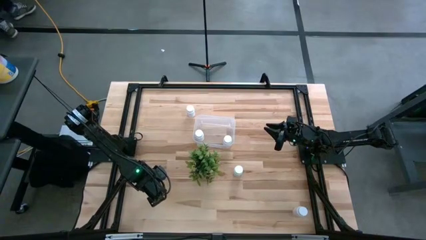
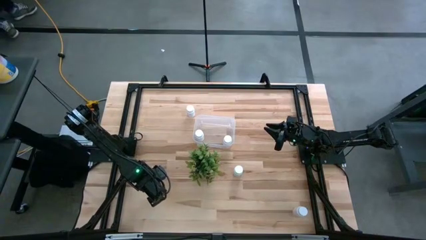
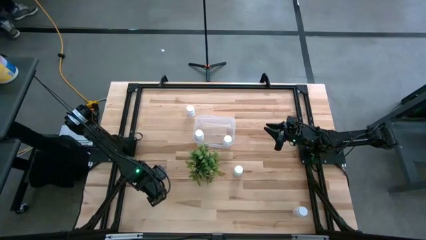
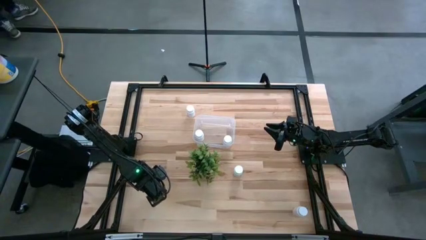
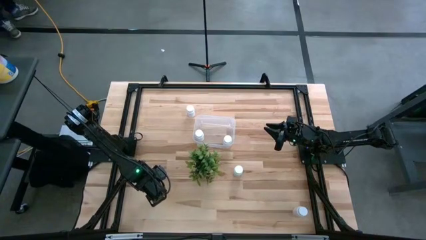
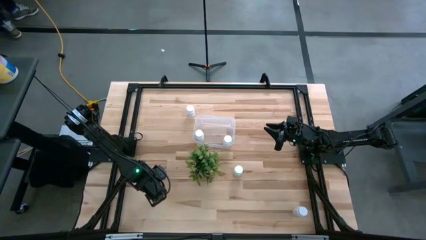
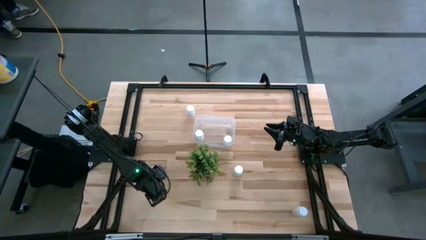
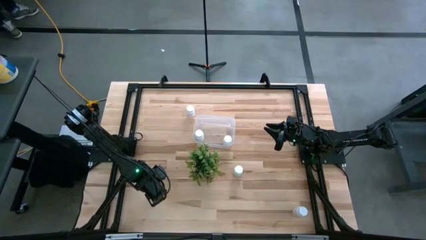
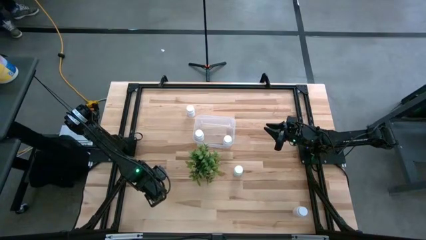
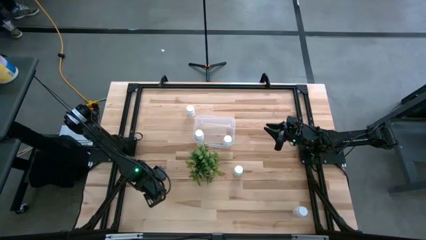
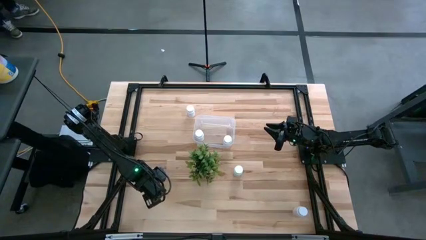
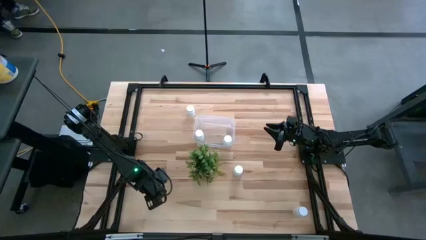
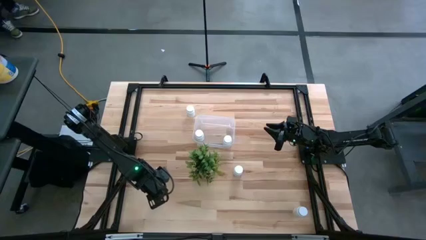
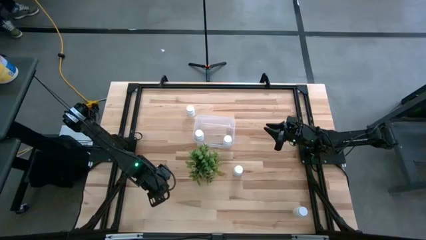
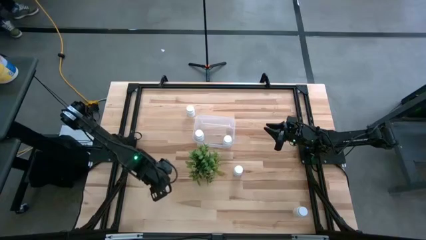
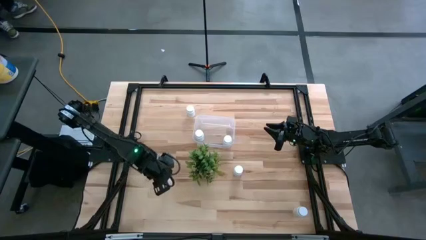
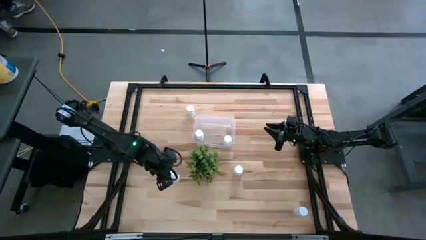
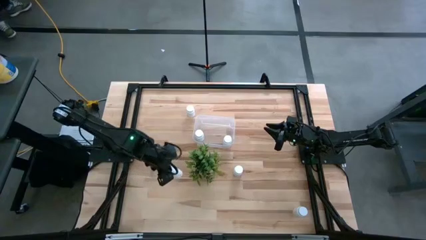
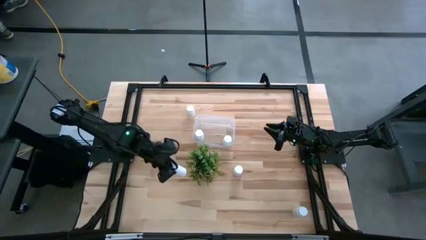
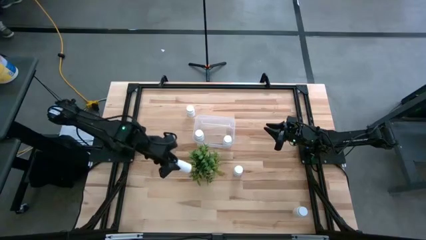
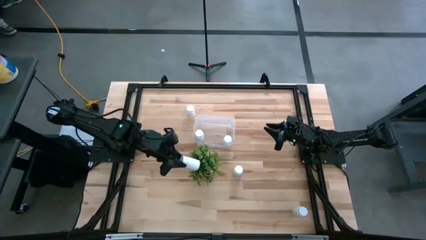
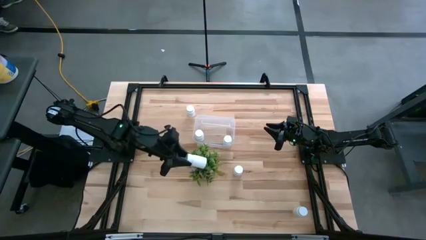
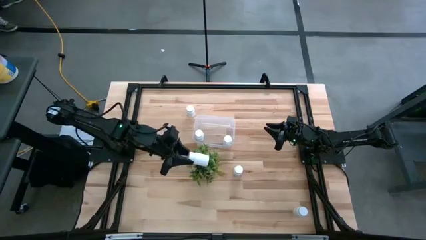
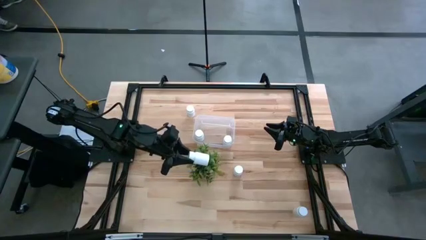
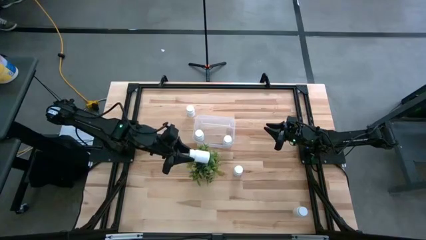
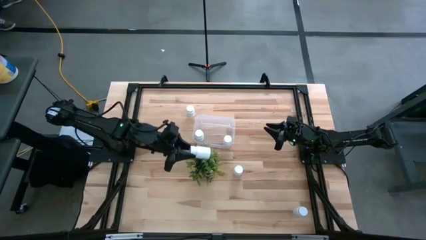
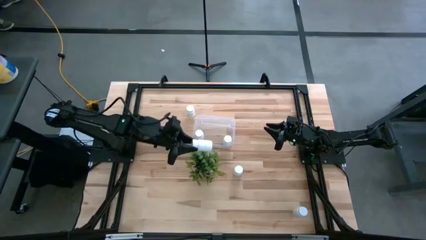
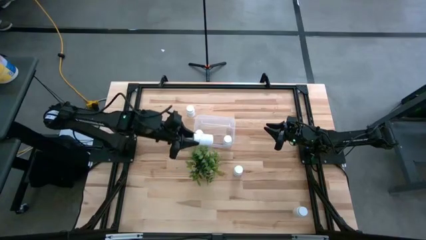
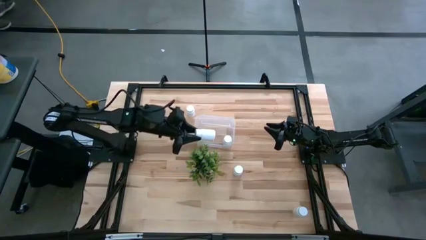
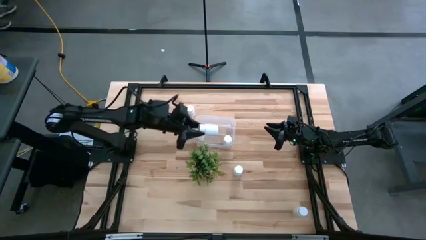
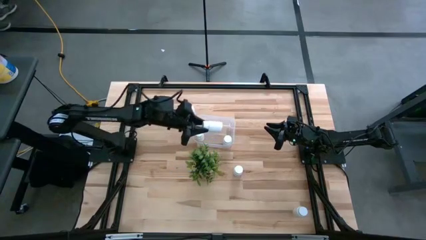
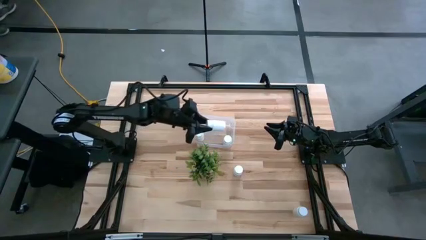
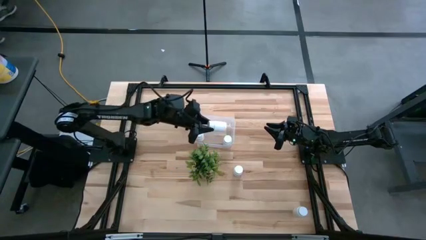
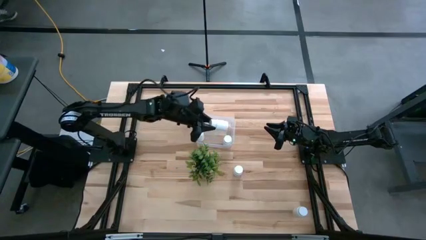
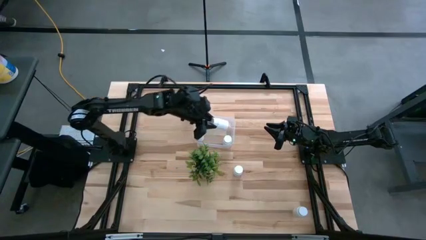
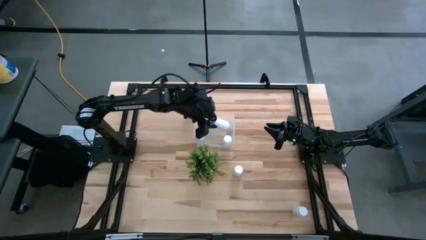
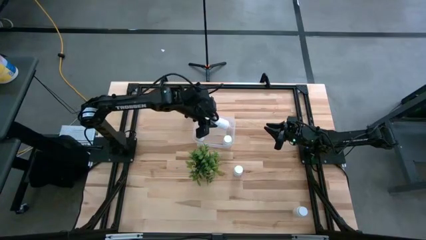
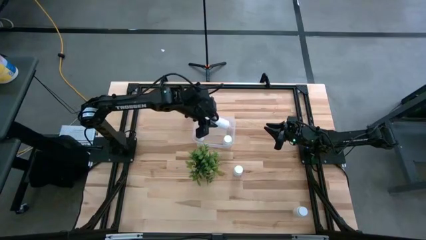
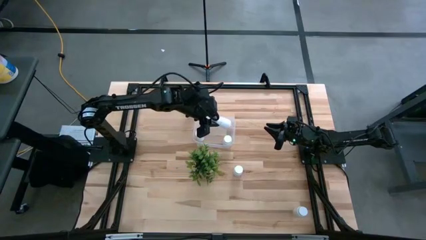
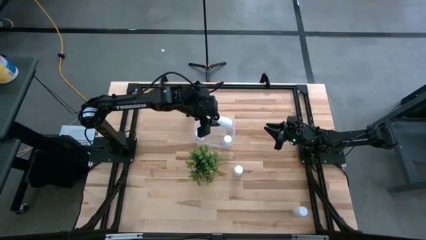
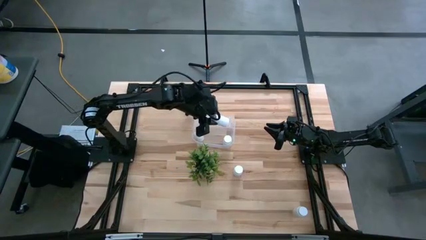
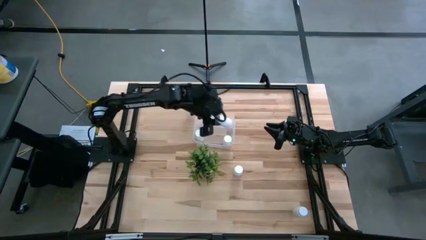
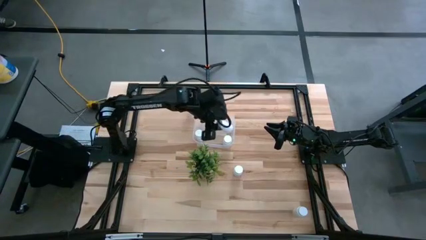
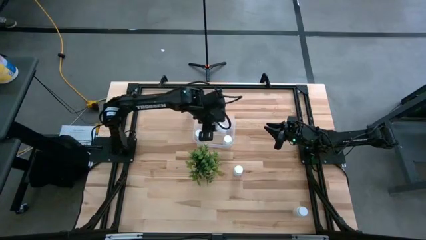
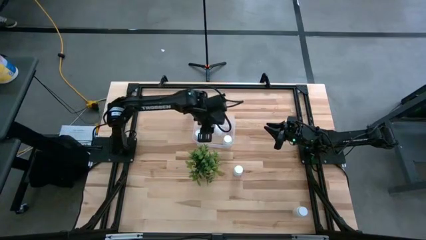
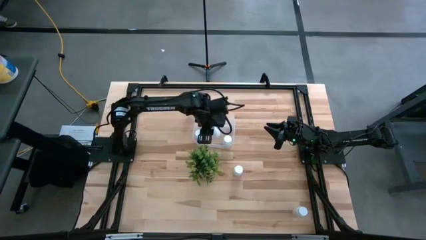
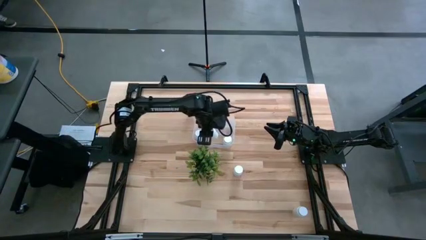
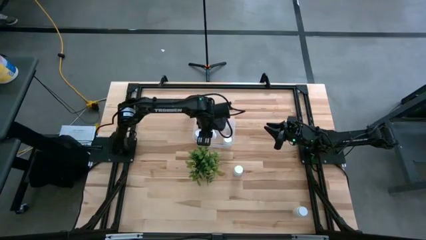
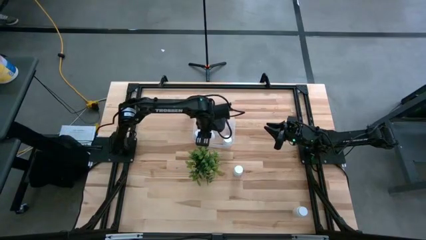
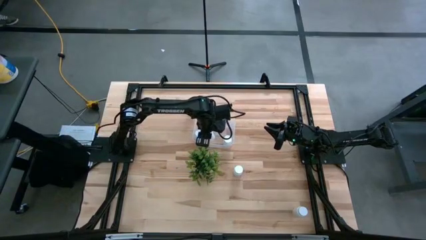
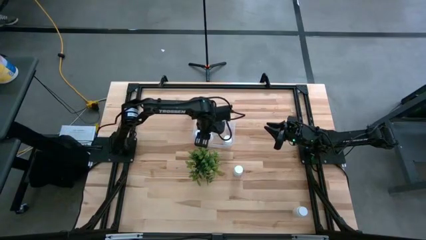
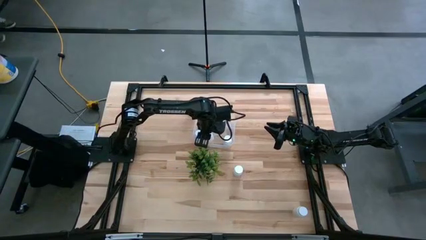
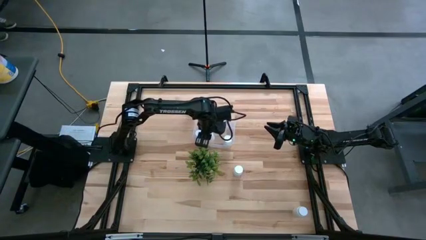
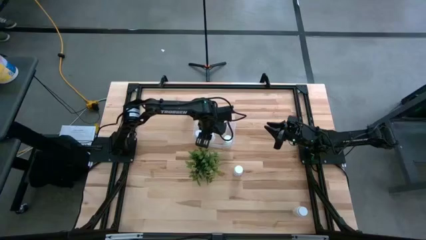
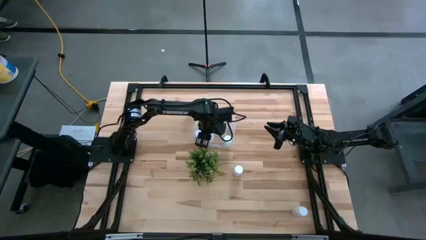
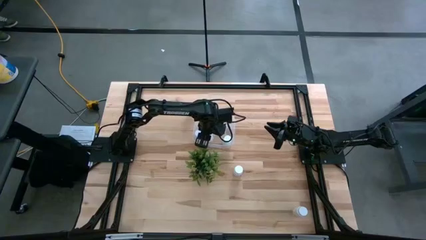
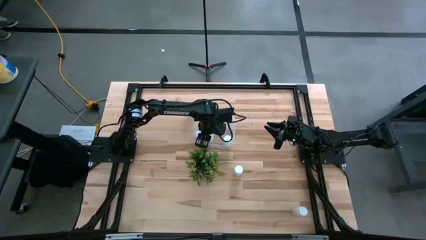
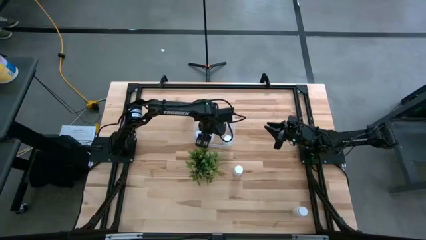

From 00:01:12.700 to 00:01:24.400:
Task: Pick and place pill bottles into a basket
Put the white pill bottle in the transparent bin
